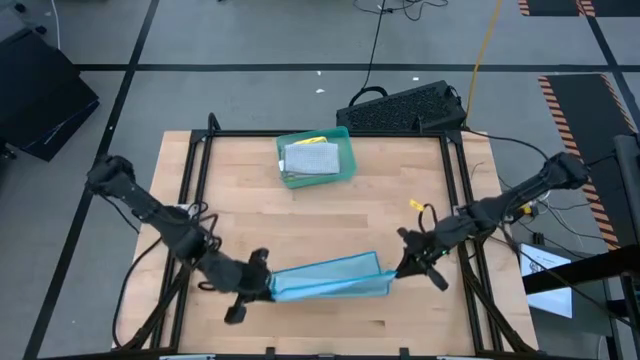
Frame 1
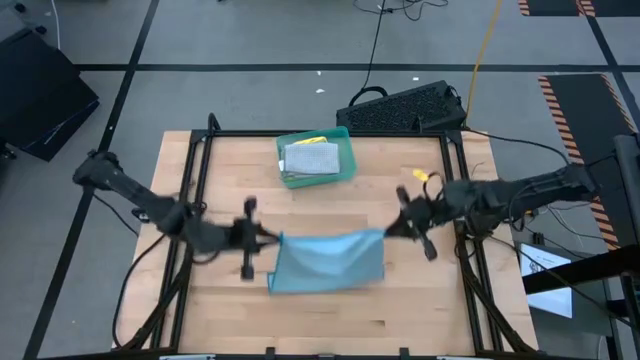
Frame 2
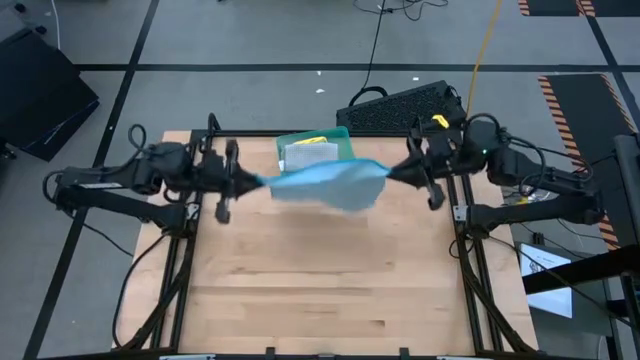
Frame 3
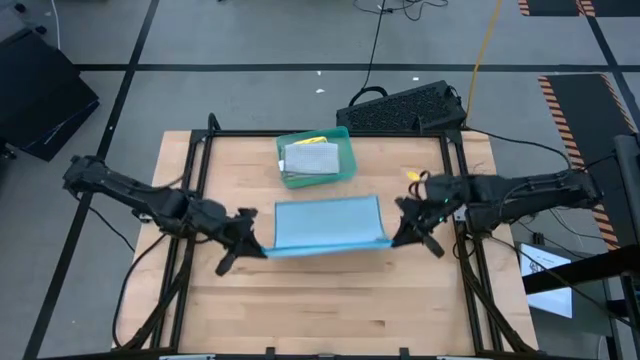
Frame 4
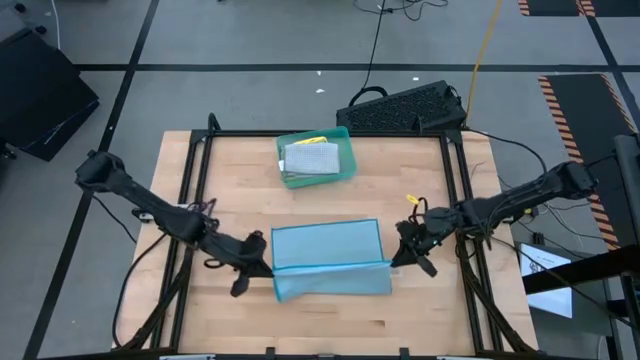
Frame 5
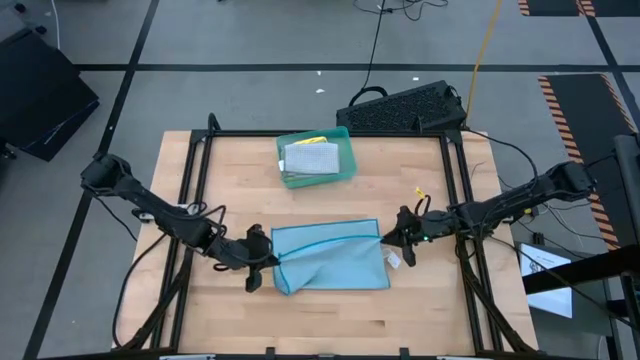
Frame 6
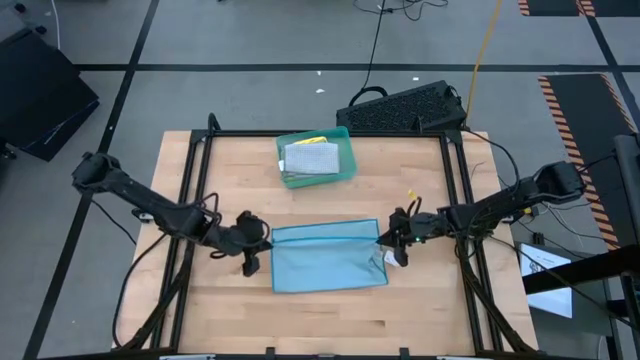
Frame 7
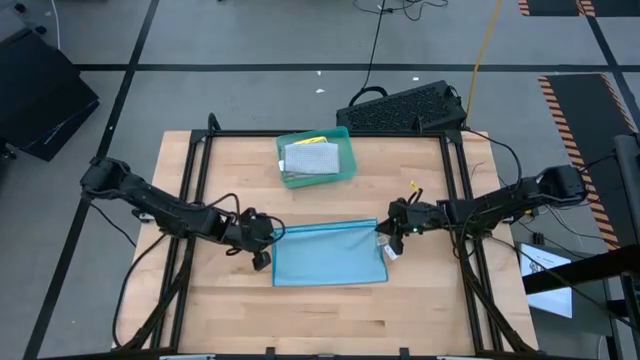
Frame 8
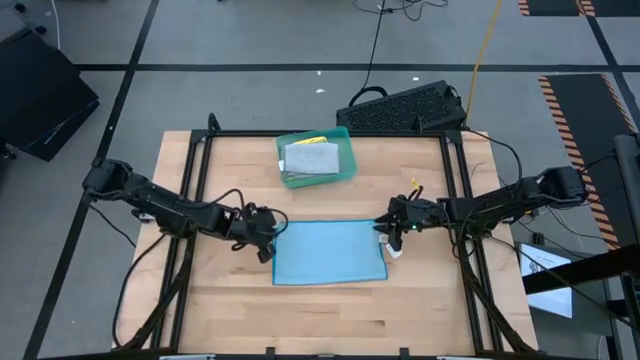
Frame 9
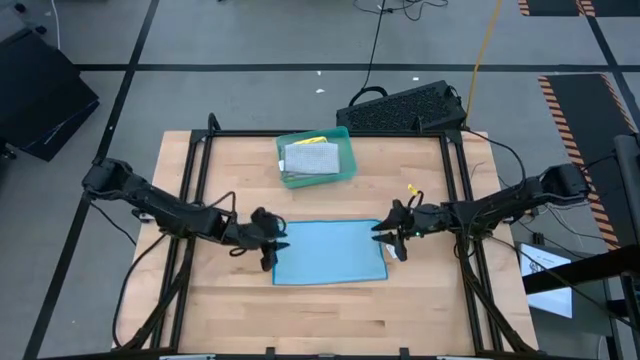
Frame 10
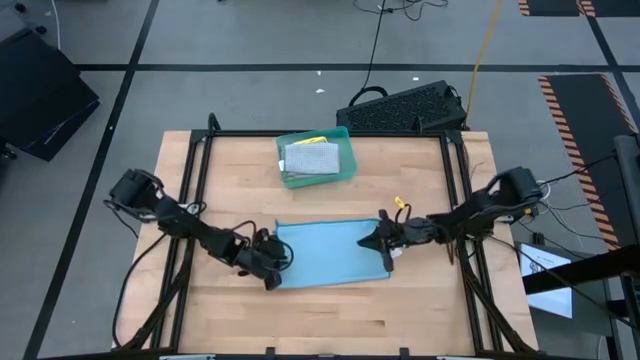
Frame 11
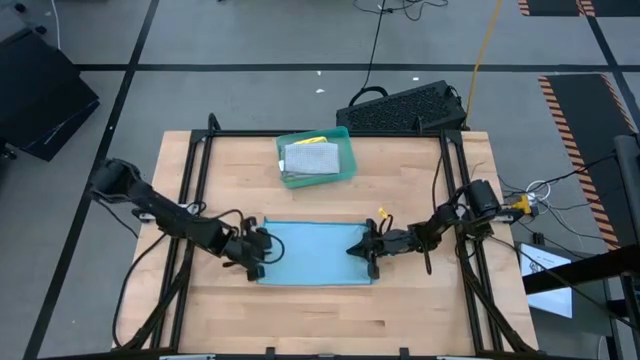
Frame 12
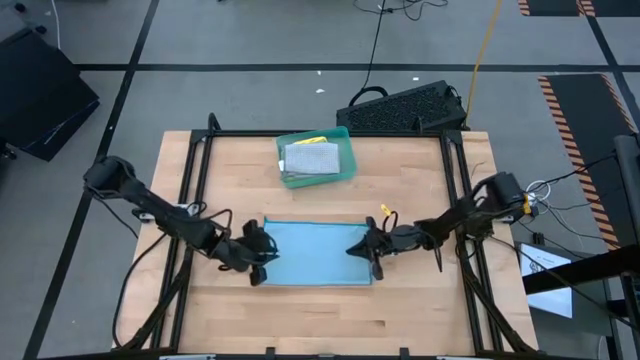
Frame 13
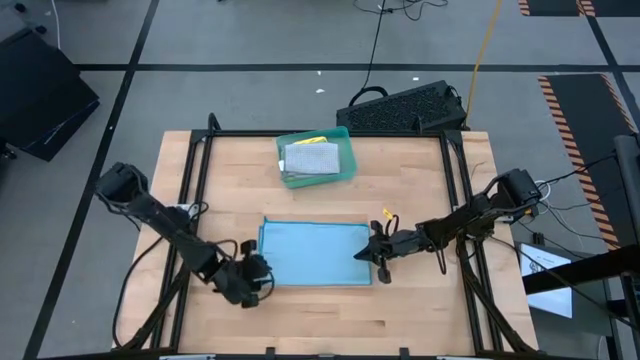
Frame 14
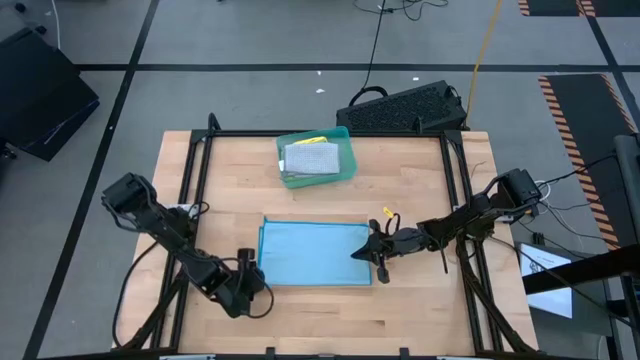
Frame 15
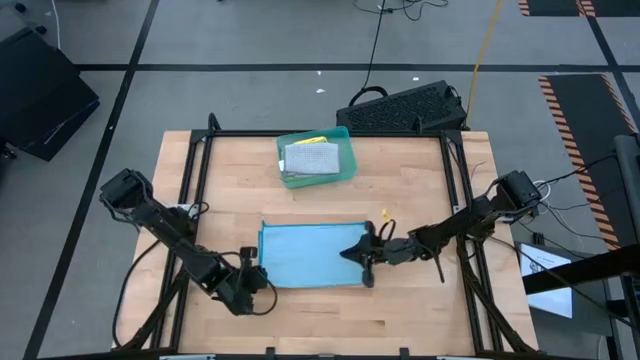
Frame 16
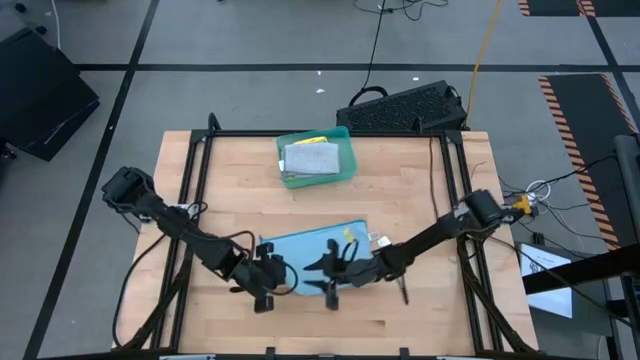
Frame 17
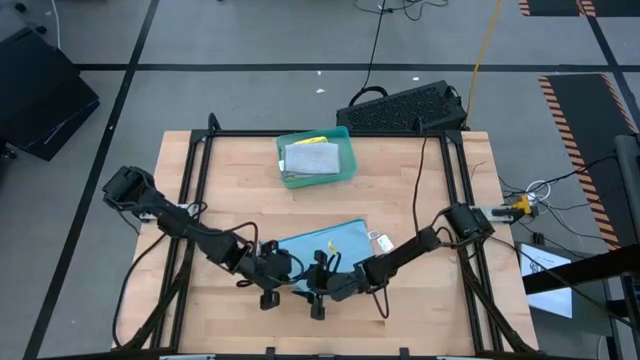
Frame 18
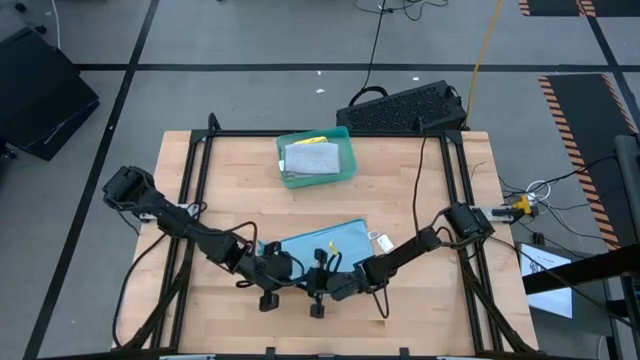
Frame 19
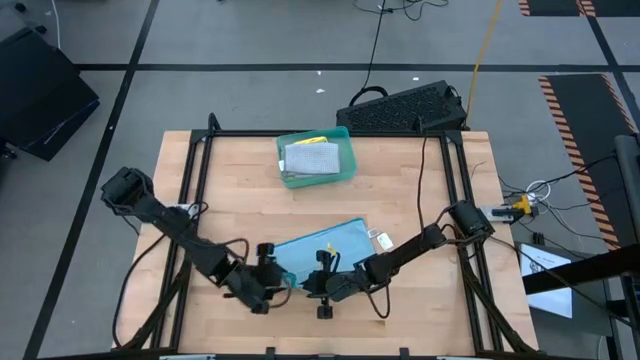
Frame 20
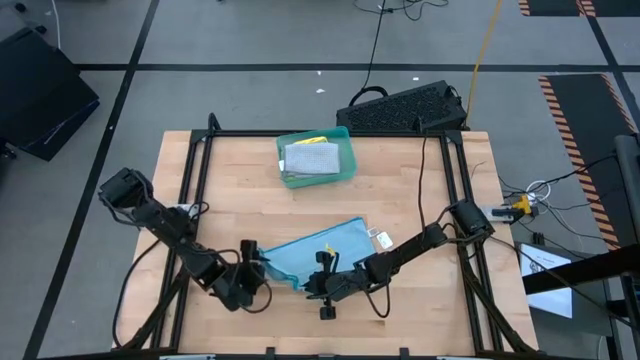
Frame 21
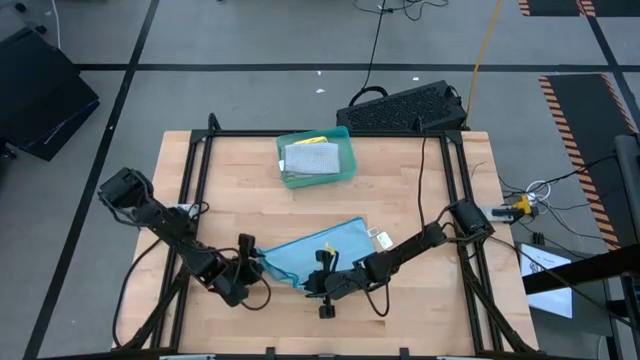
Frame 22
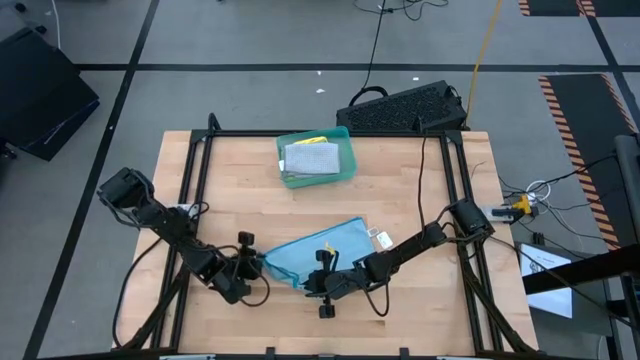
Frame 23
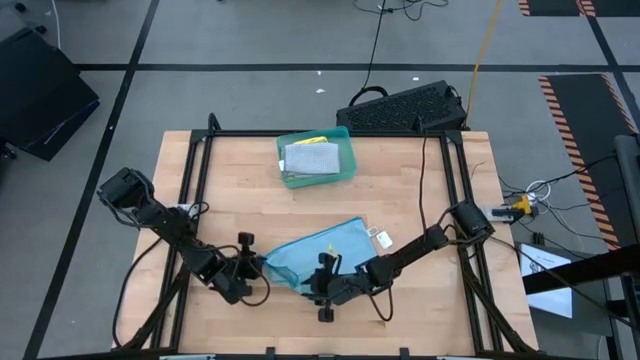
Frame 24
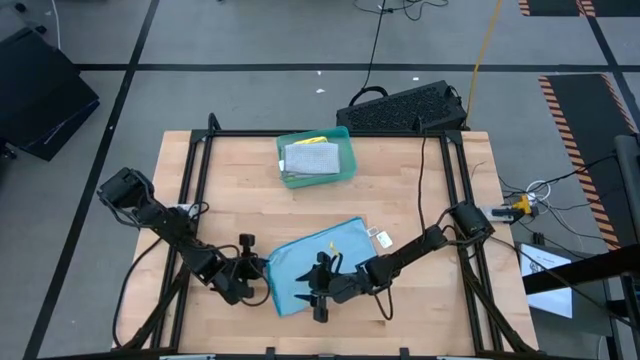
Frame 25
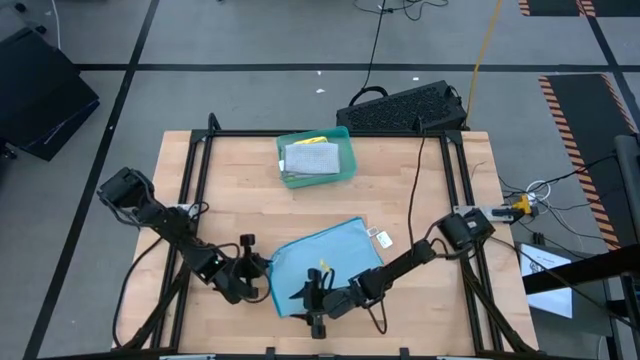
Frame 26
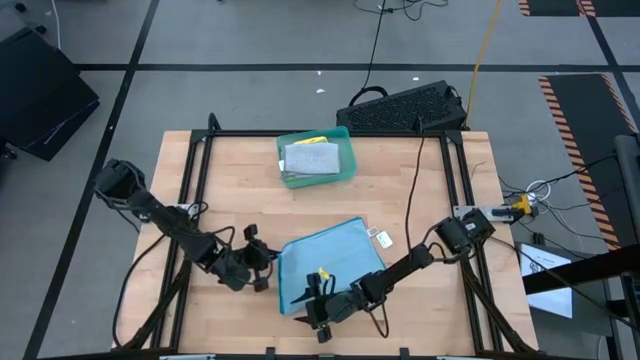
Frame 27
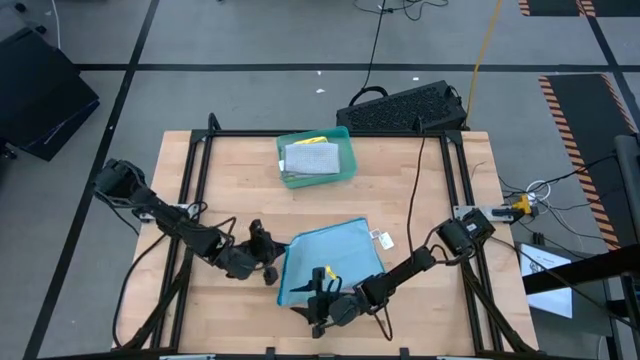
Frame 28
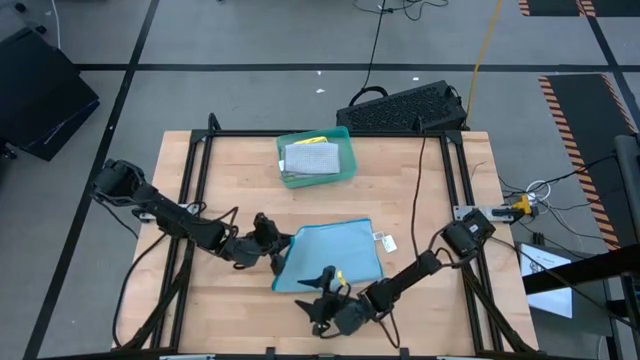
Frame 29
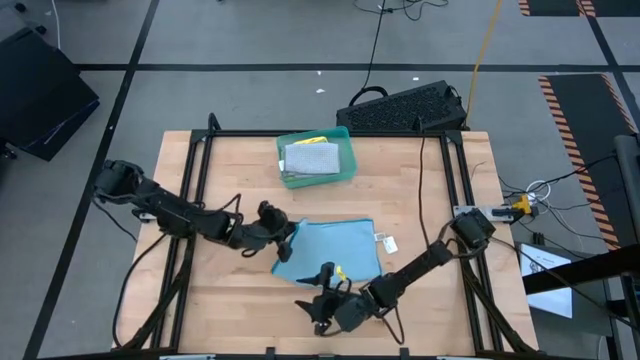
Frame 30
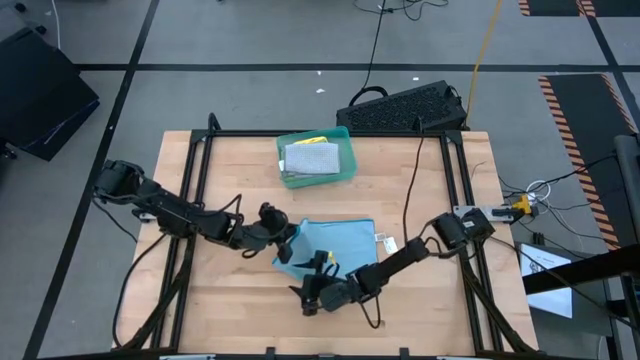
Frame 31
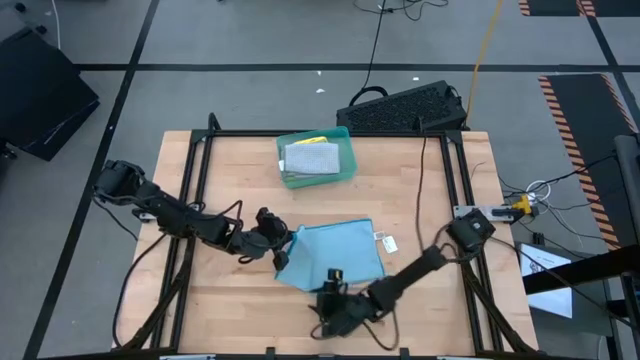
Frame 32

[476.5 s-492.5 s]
Task: Fold microfiber towels
Fold the blue microfiber cloth

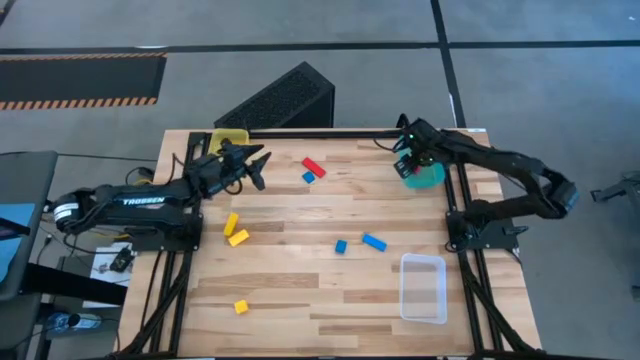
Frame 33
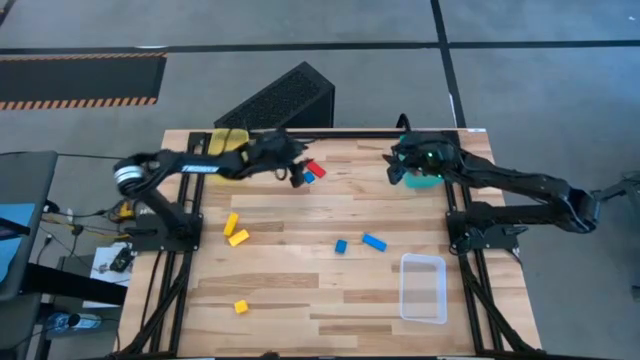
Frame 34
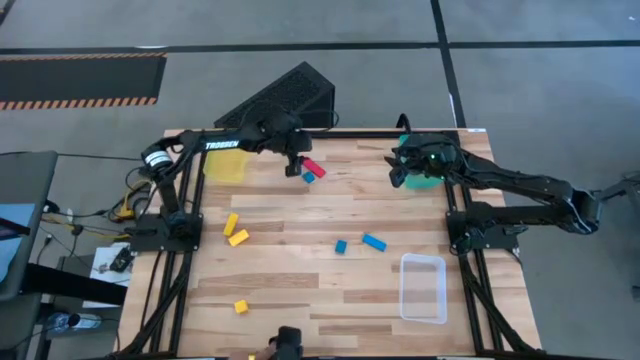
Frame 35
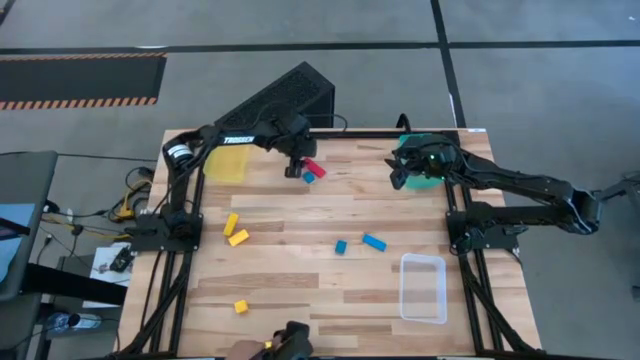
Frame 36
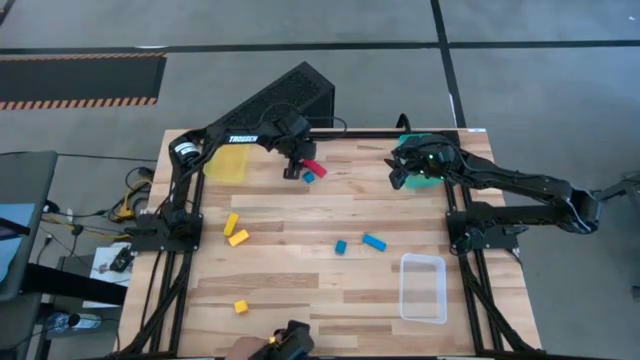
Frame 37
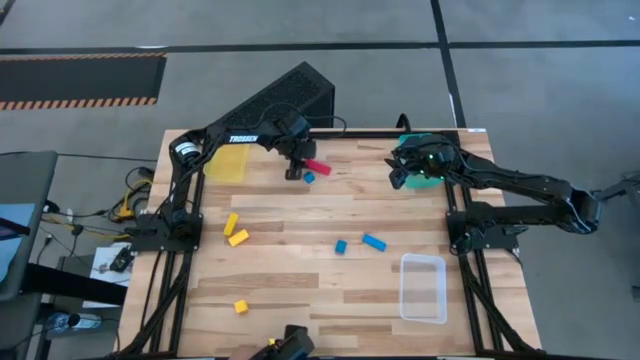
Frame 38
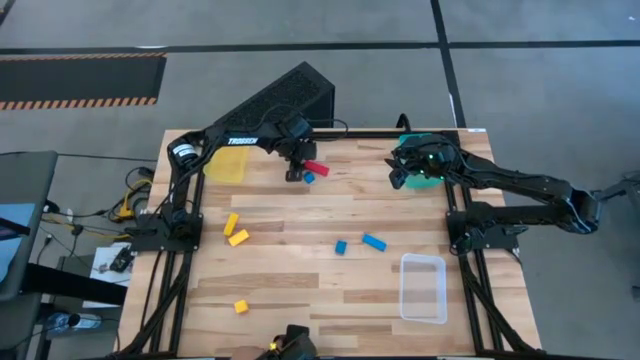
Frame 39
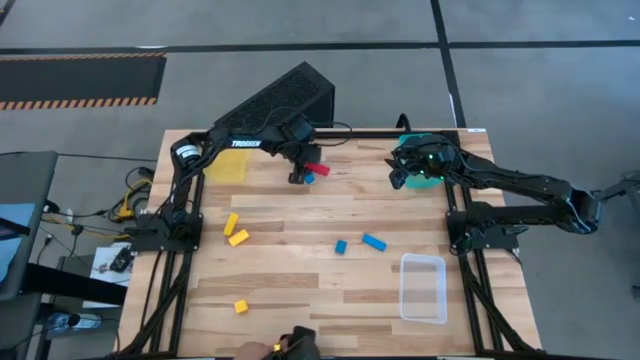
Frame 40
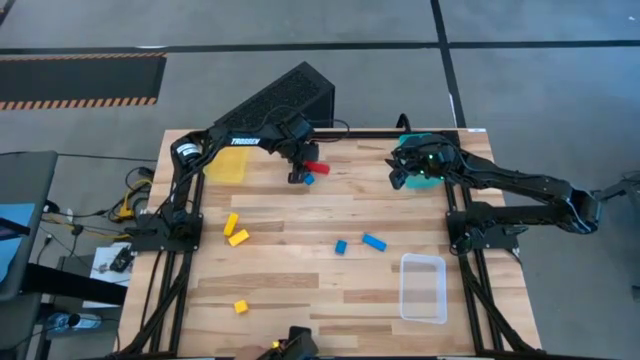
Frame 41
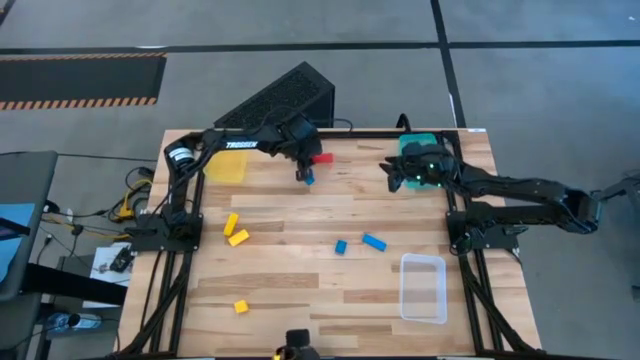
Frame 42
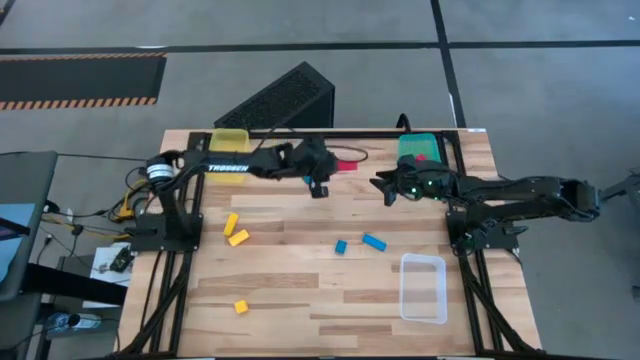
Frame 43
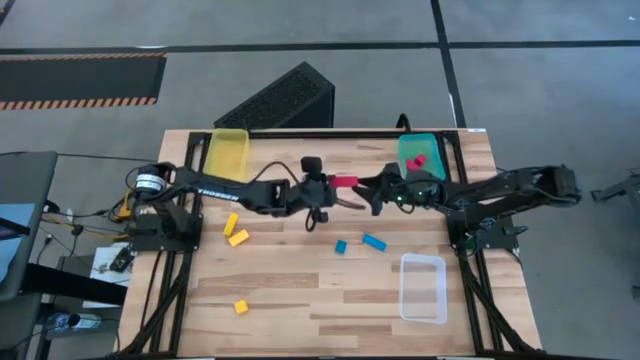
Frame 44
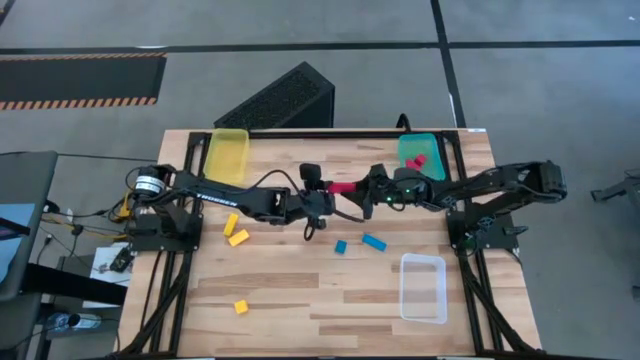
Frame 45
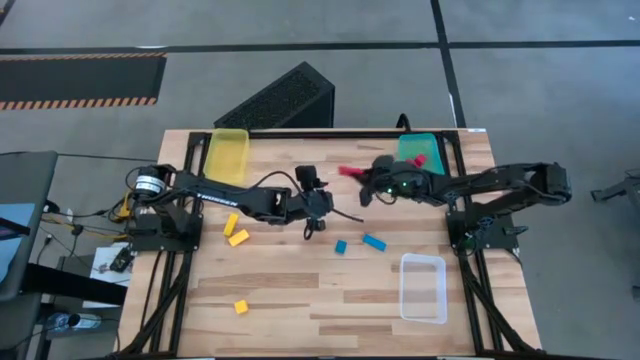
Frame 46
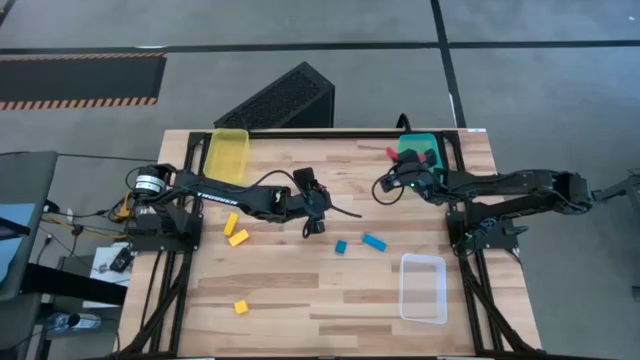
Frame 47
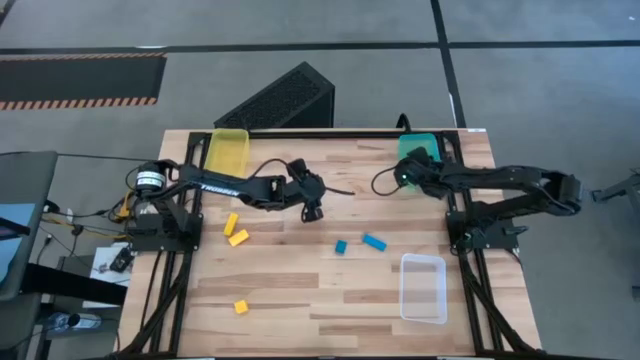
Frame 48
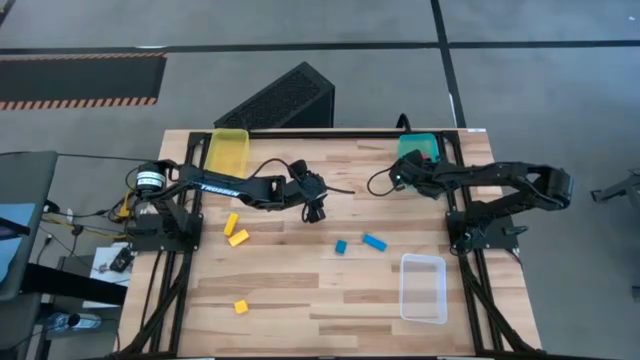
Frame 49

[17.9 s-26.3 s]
Task: Sort & place blocks by color
Put the red block into the light blue bin
